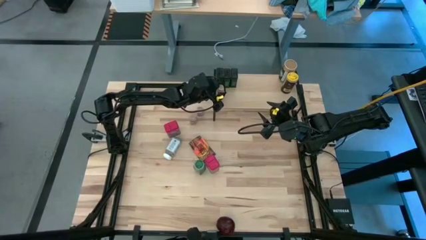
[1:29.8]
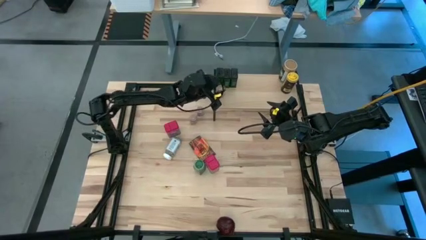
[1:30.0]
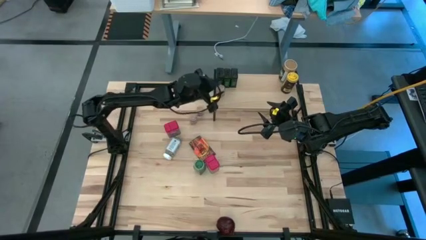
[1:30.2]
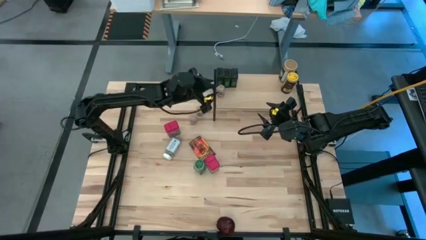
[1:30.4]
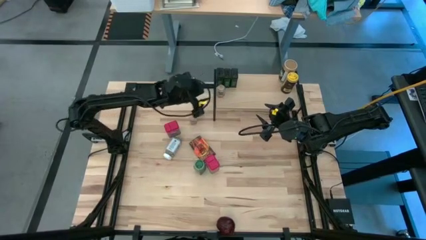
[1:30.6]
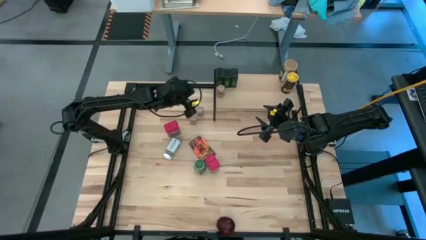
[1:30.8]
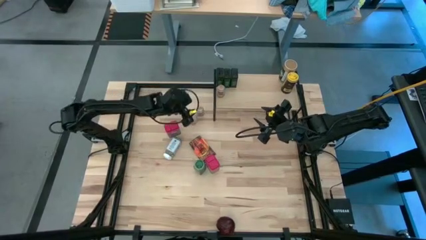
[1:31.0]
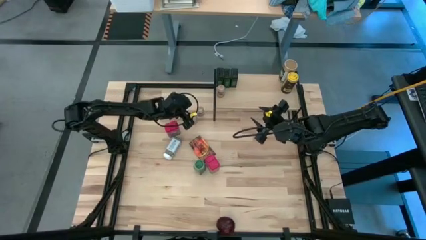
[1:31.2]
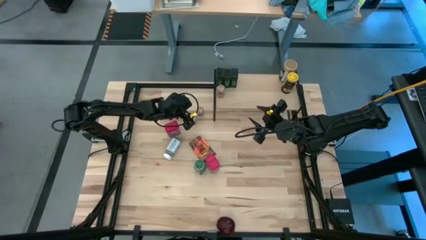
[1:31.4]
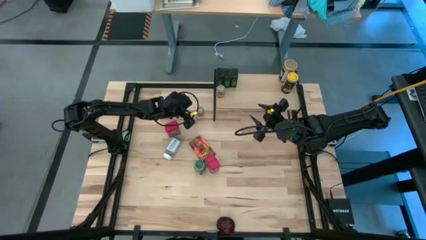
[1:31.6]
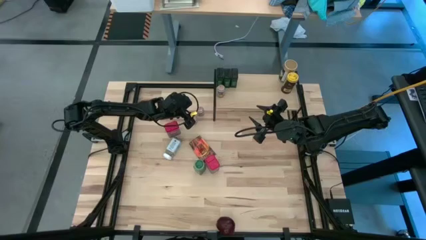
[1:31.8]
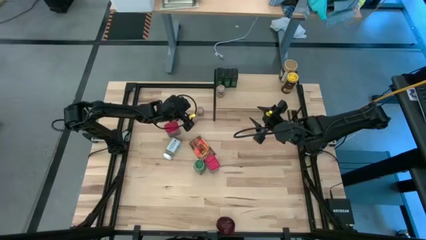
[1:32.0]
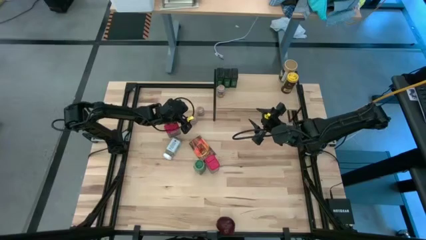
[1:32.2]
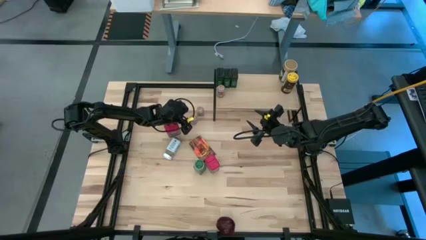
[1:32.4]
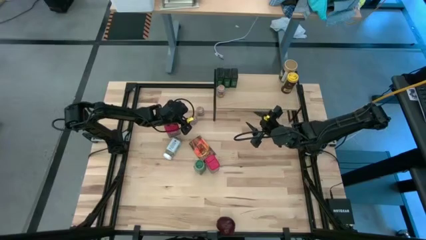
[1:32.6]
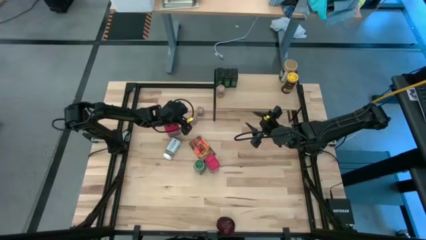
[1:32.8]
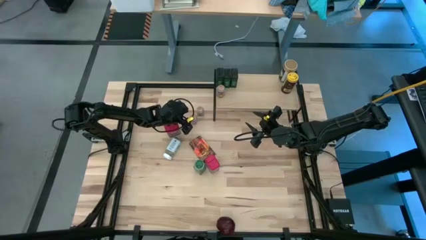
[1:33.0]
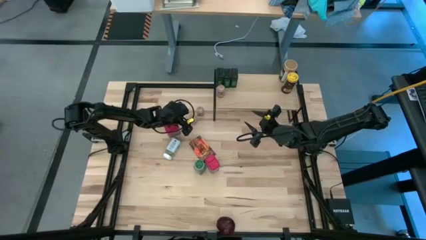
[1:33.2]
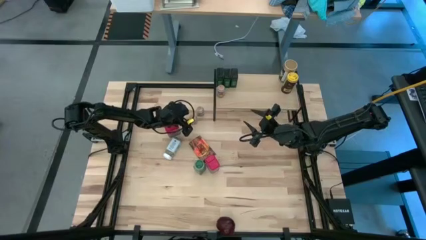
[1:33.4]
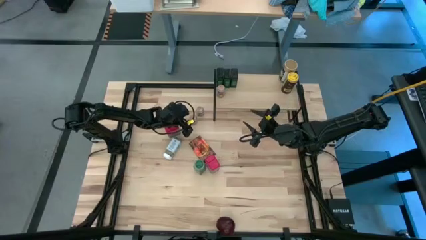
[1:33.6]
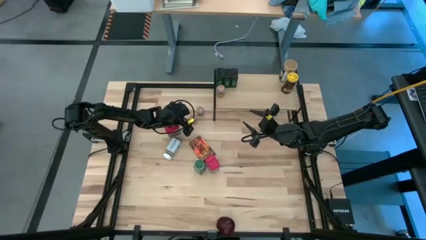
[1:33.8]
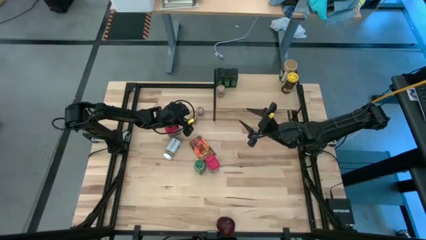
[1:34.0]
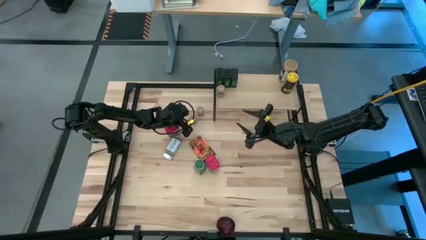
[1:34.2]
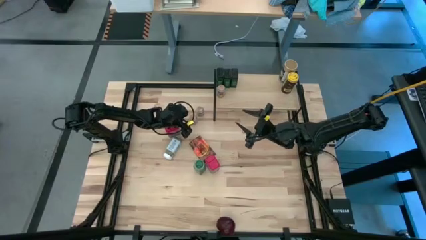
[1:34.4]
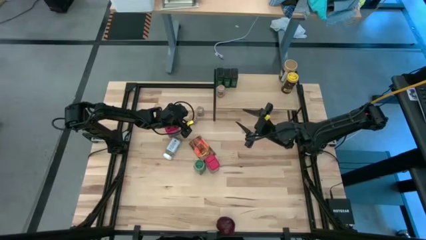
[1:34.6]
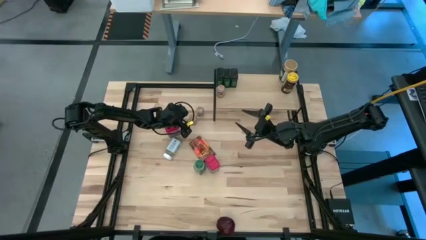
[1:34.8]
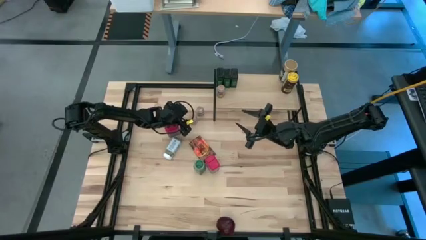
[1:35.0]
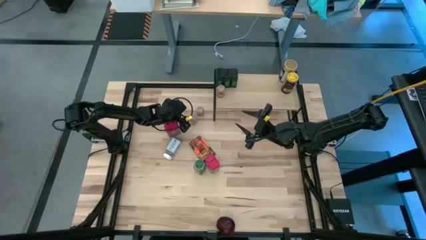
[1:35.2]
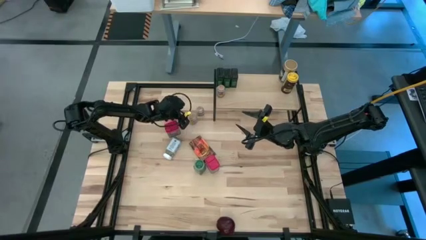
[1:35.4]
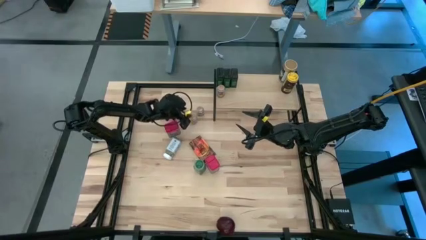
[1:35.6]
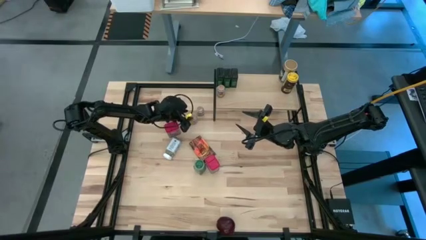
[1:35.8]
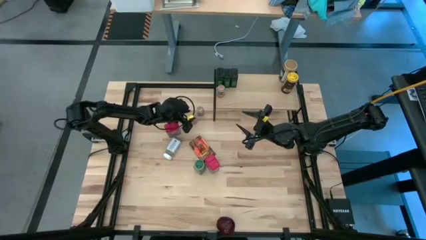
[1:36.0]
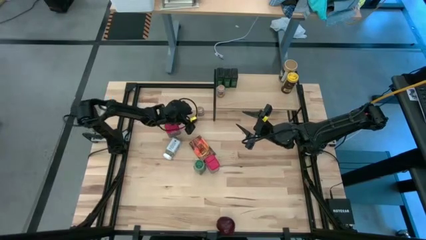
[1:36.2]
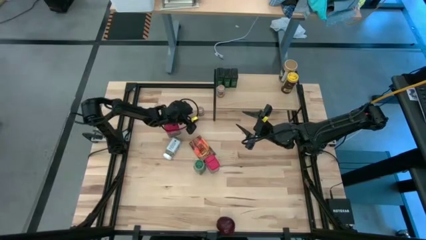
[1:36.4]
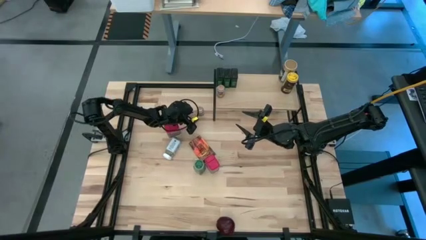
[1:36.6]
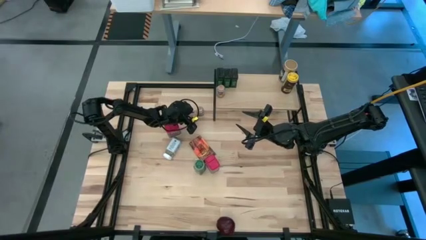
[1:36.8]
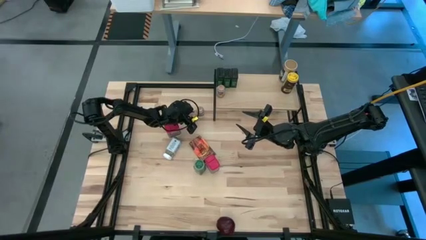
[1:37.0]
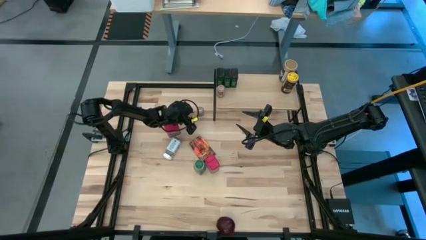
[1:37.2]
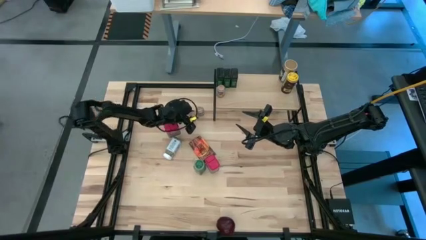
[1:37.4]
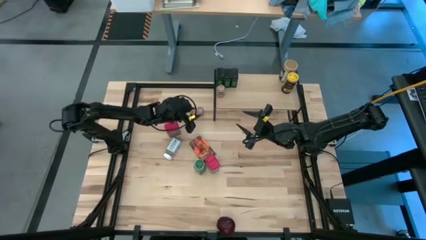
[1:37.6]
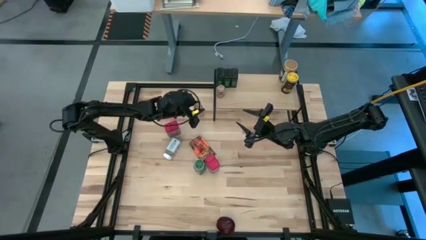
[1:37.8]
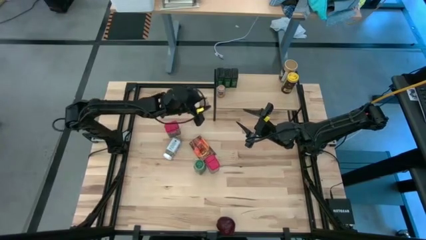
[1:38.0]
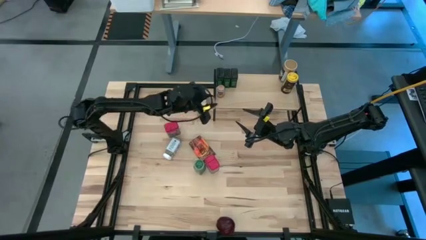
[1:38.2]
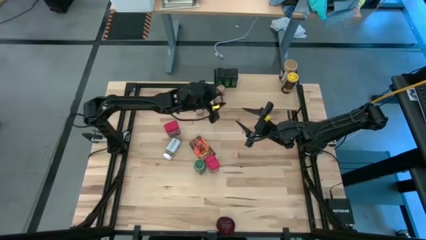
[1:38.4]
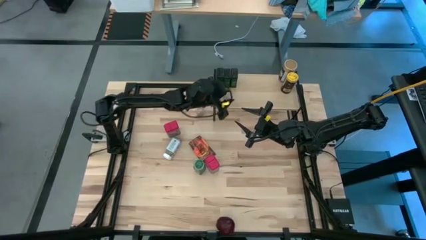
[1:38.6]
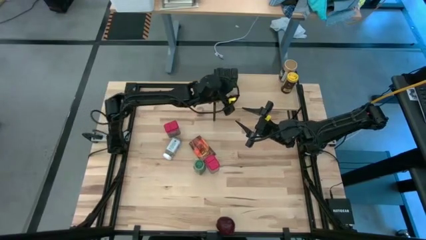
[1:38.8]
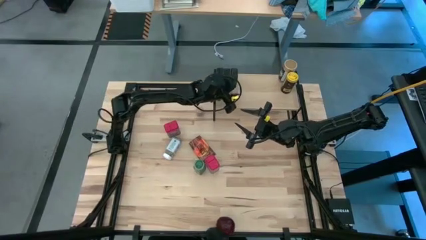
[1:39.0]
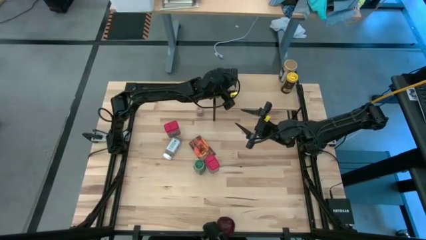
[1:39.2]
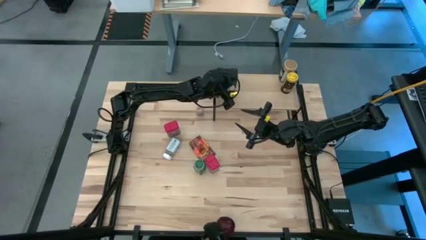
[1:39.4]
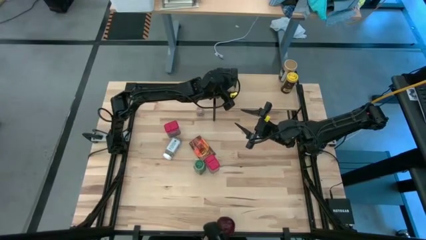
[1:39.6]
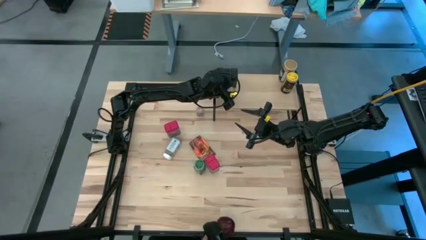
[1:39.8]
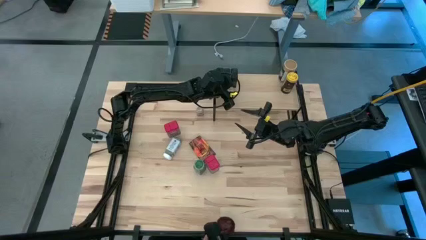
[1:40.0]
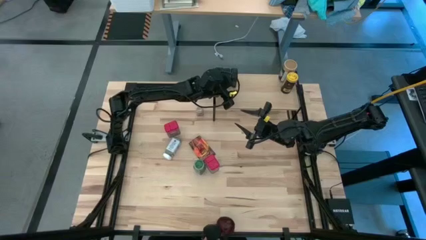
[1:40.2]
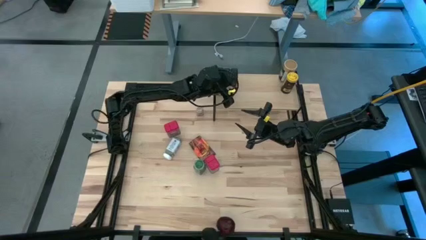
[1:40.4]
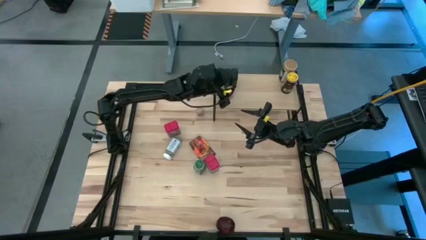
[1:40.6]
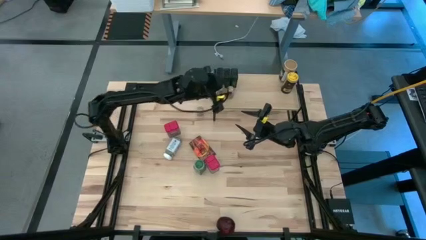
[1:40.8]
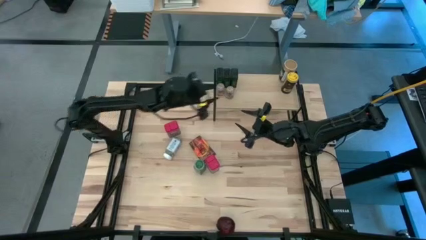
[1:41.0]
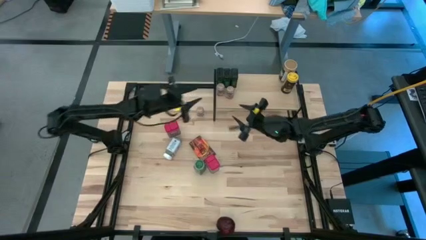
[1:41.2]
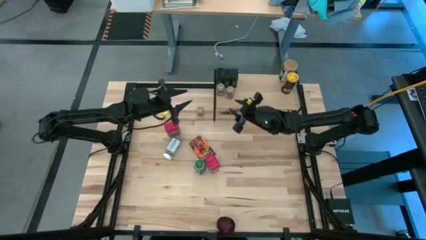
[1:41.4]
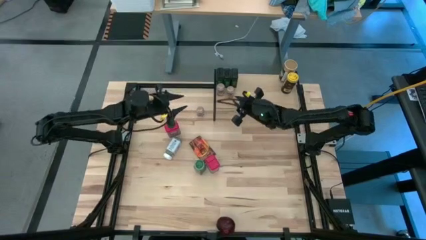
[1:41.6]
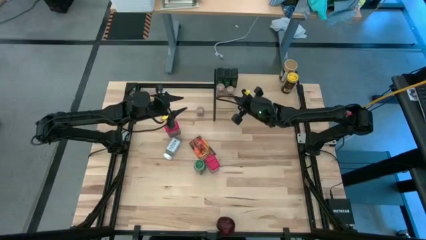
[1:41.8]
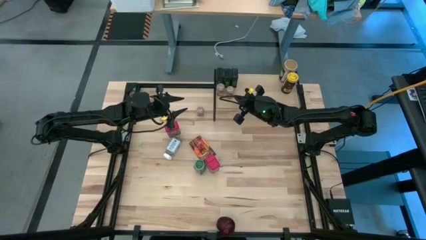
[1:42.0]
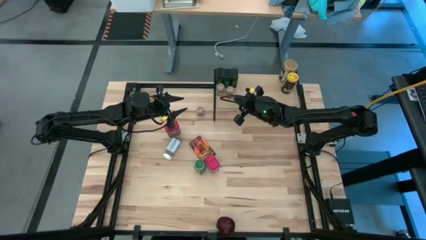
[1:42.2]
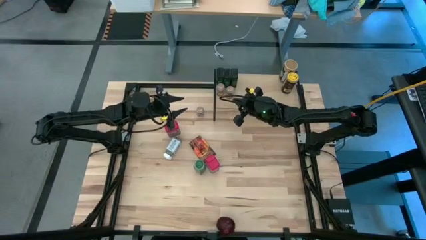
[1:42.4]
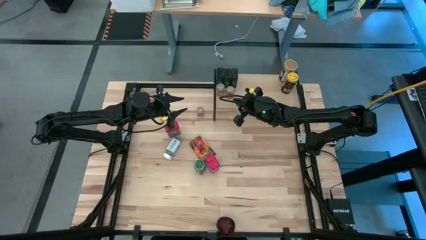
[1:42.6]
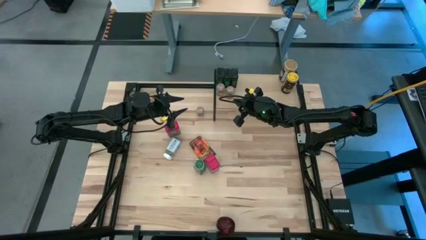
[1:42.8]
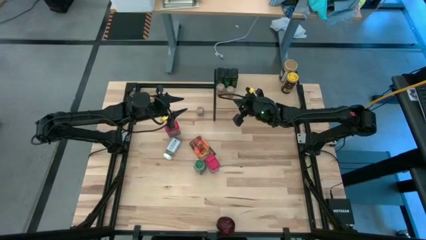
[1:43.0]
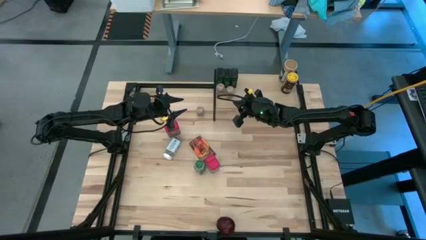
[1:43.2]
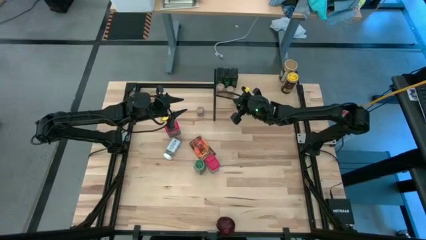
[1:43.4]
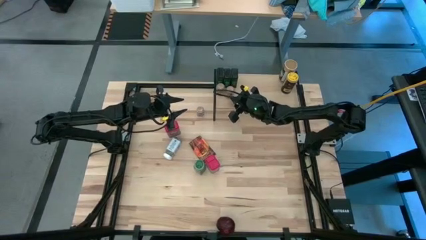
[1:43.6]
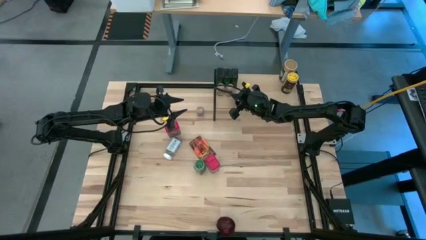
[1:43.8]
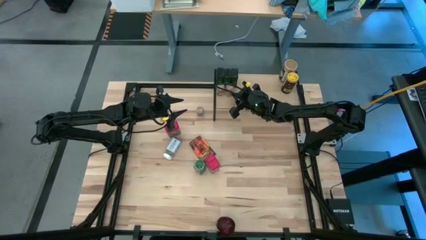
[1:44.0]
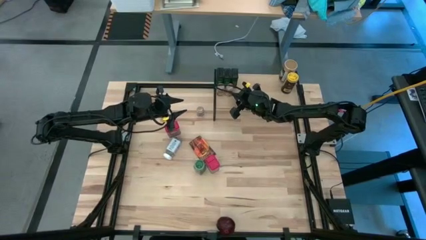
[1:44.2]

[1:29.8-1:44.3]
Task: Shelf spices
Put the bottom transparent seasoning bottle on the shelf

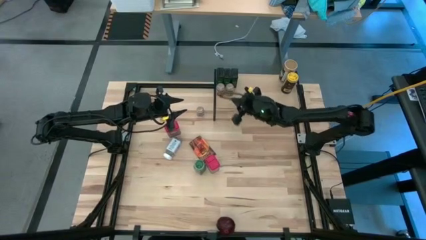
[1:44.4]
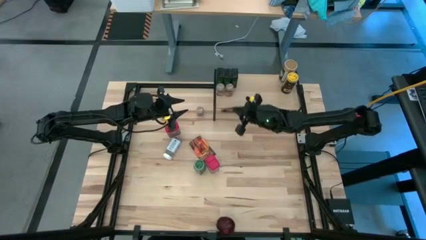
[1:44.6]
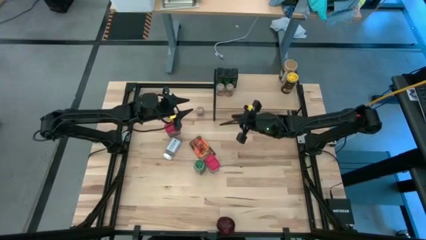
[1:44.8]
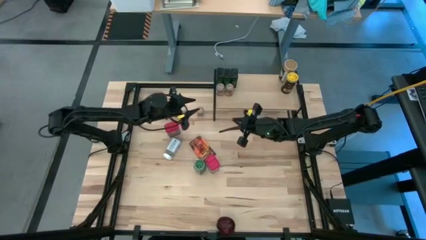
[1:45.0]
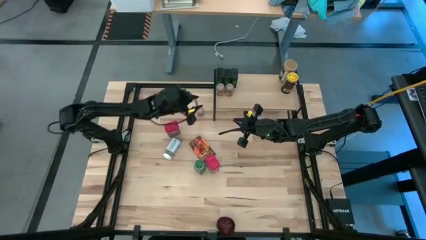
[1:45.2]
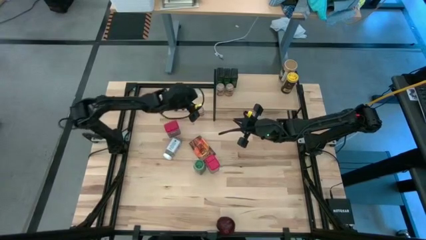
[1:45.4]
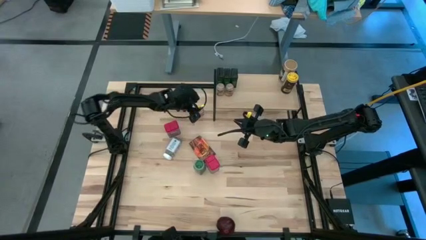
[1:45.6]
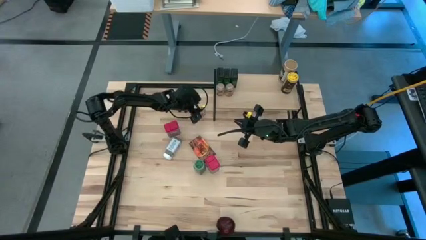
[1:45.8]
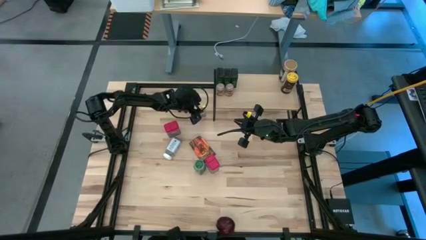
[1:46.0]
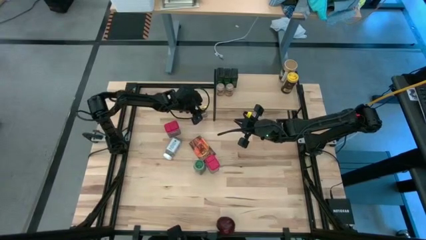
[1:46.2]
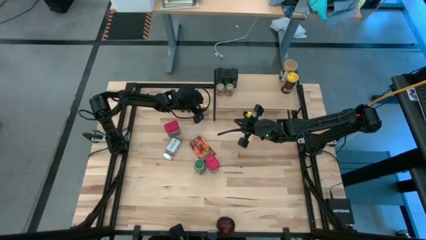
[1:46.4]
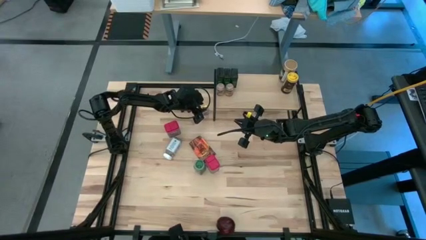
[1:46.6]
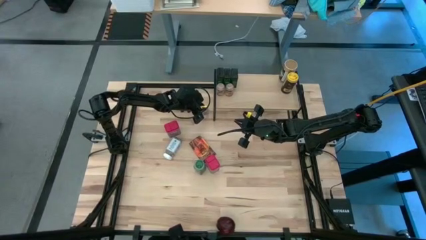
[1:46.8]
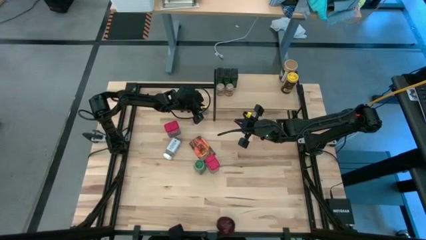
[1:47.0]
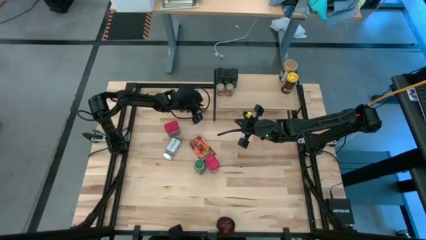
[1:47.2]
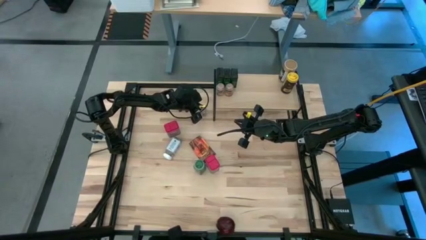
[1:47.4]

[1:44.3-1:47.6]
Put the transparent seasoning bottle on the shelf
